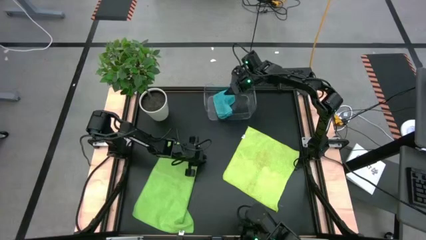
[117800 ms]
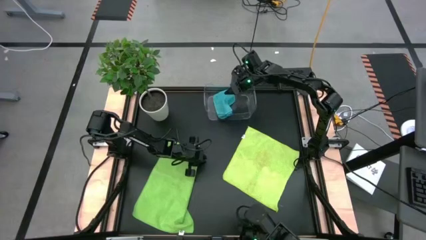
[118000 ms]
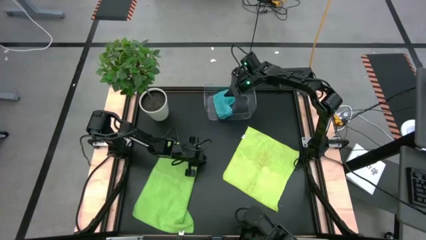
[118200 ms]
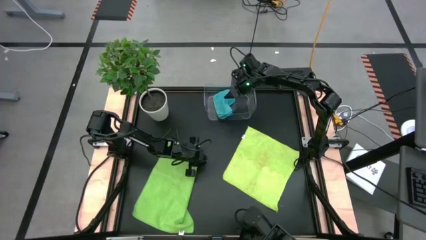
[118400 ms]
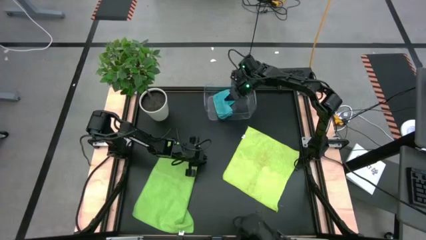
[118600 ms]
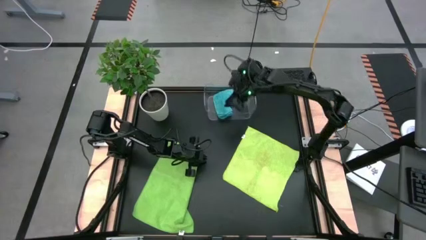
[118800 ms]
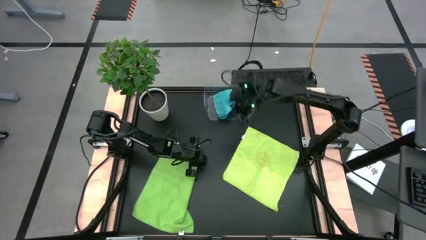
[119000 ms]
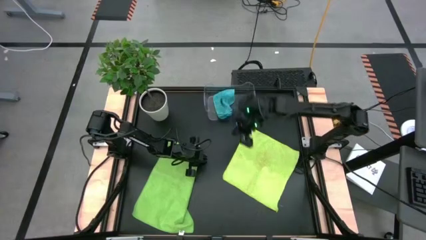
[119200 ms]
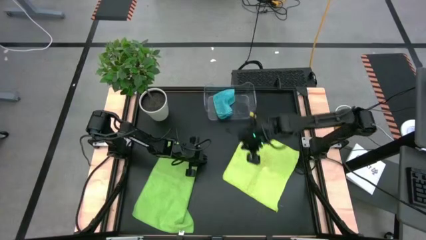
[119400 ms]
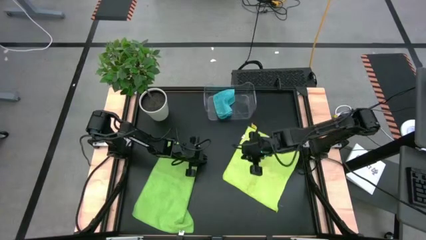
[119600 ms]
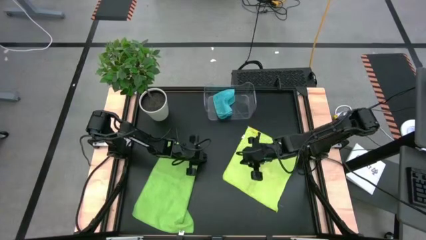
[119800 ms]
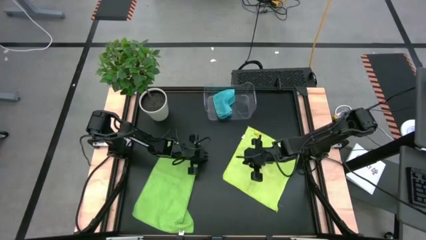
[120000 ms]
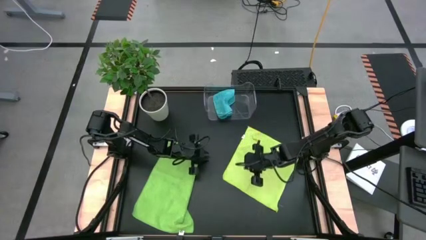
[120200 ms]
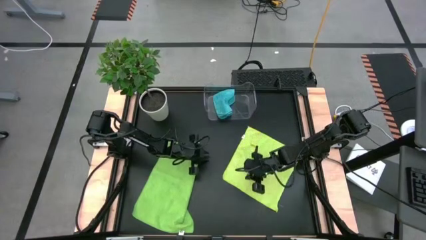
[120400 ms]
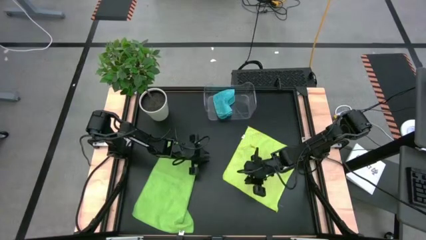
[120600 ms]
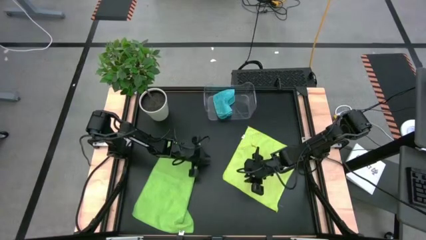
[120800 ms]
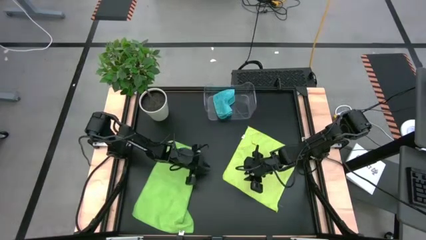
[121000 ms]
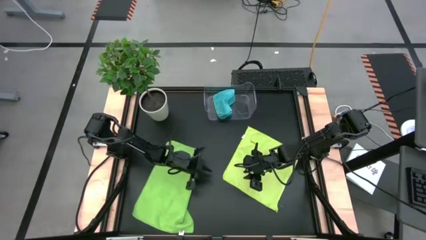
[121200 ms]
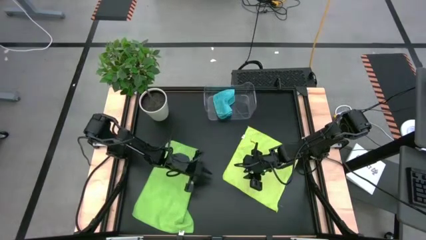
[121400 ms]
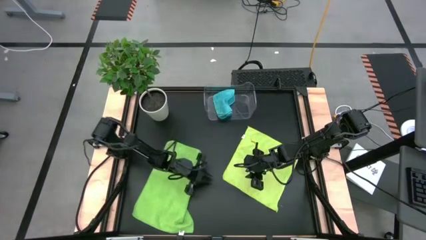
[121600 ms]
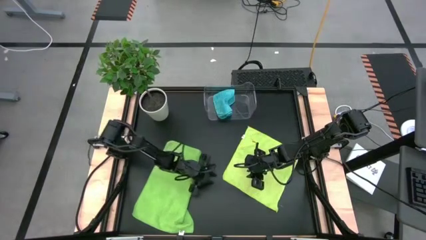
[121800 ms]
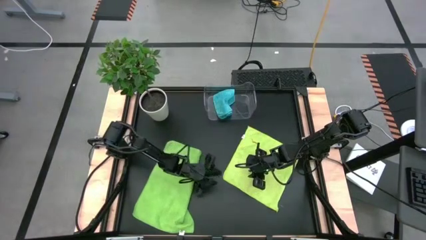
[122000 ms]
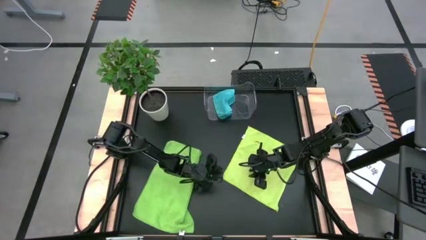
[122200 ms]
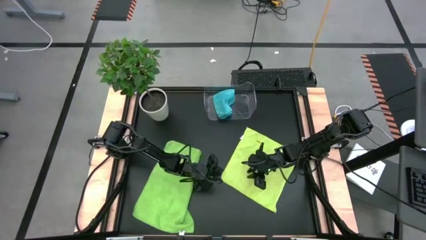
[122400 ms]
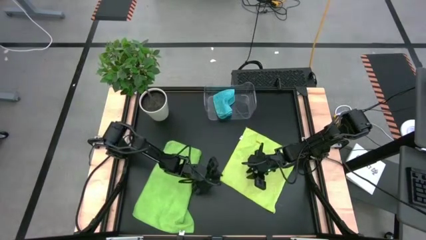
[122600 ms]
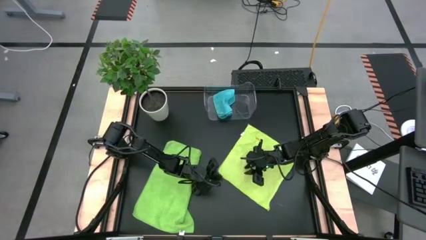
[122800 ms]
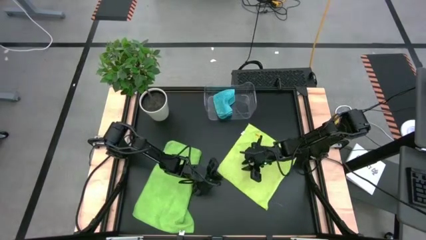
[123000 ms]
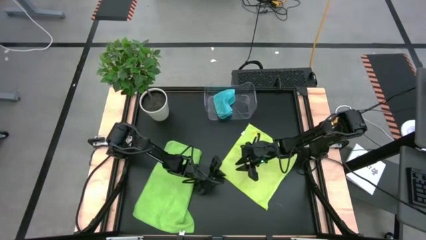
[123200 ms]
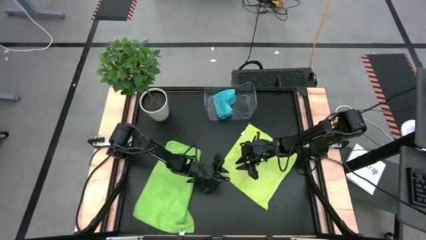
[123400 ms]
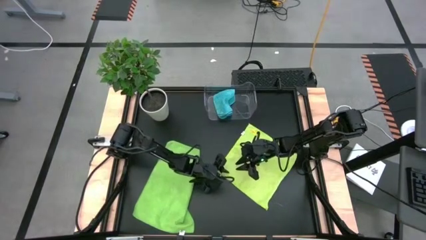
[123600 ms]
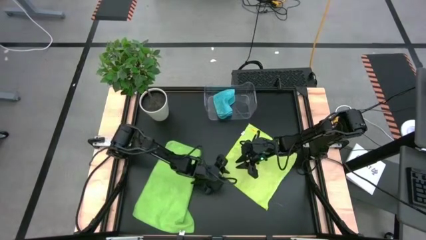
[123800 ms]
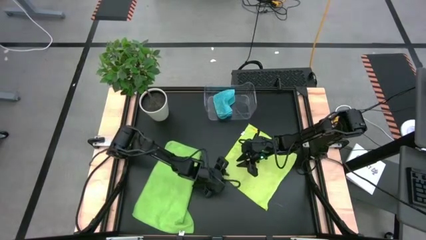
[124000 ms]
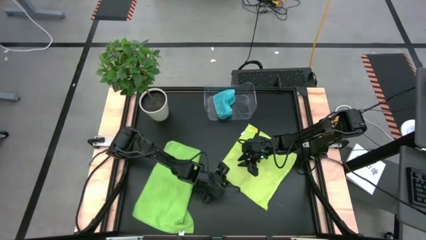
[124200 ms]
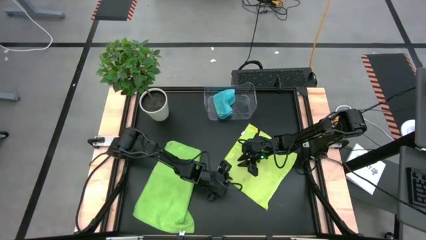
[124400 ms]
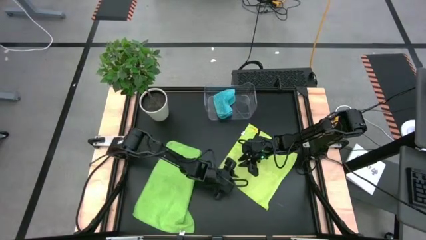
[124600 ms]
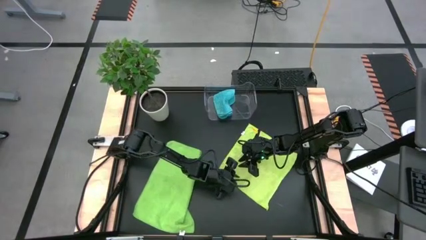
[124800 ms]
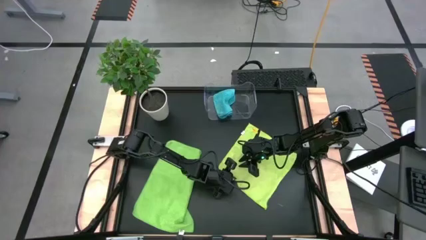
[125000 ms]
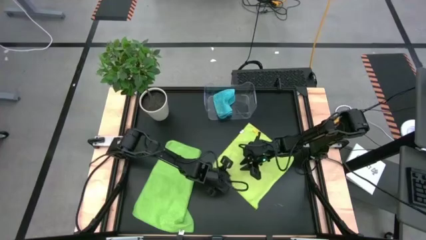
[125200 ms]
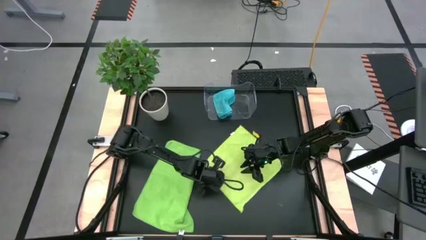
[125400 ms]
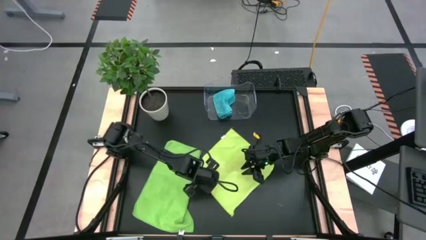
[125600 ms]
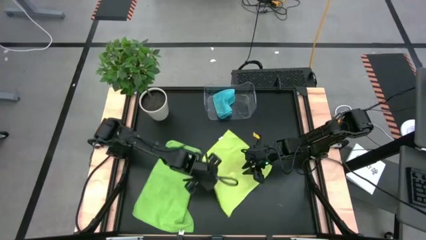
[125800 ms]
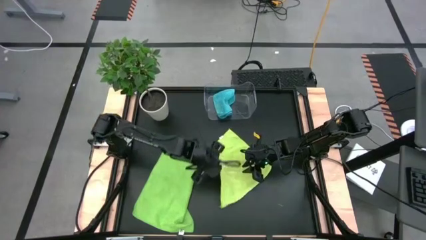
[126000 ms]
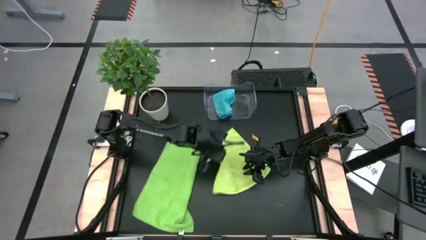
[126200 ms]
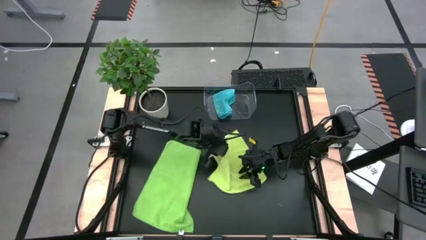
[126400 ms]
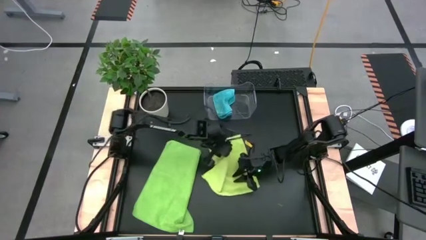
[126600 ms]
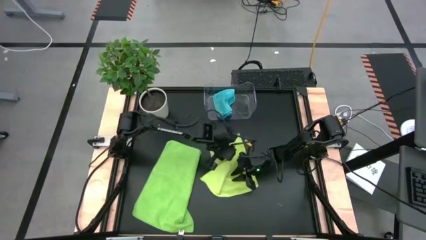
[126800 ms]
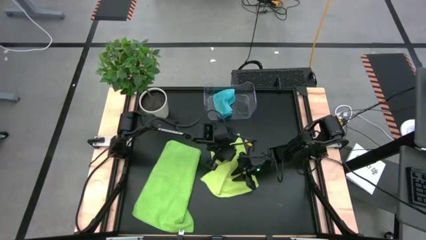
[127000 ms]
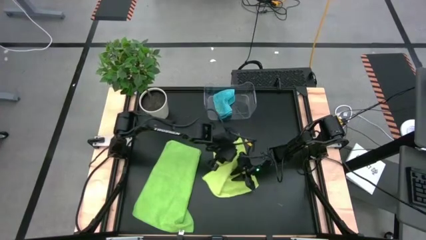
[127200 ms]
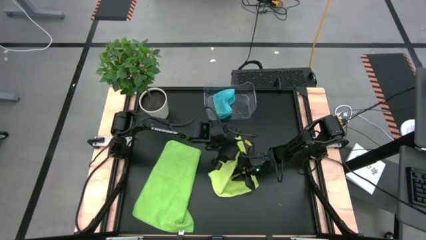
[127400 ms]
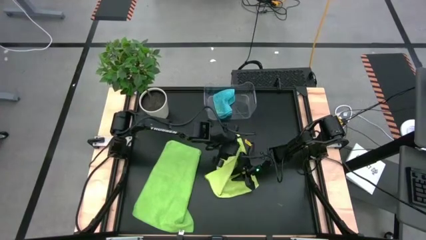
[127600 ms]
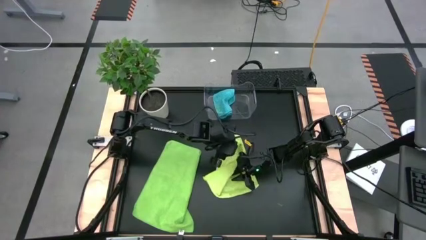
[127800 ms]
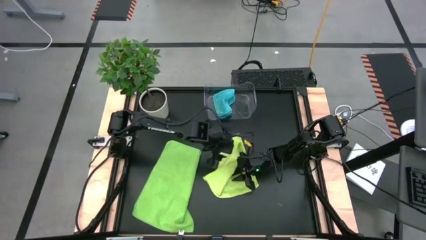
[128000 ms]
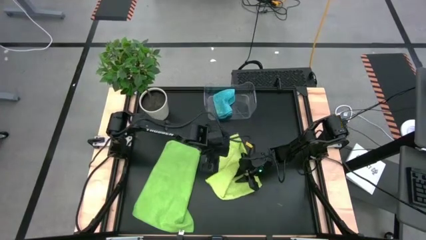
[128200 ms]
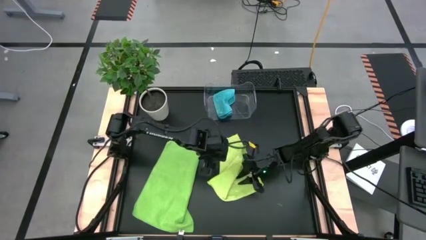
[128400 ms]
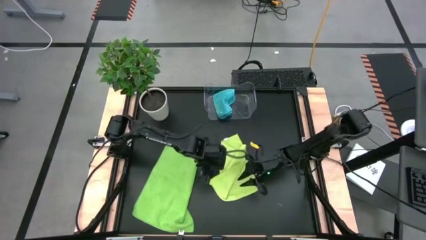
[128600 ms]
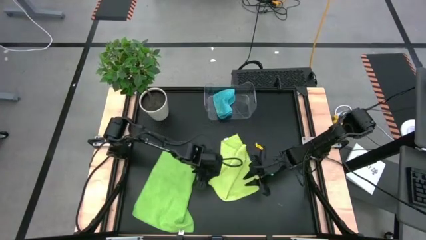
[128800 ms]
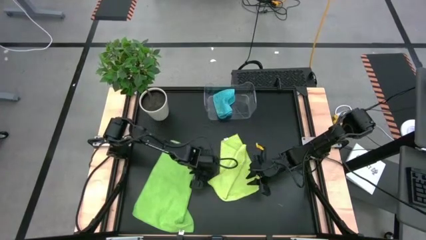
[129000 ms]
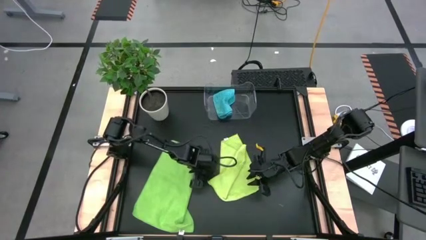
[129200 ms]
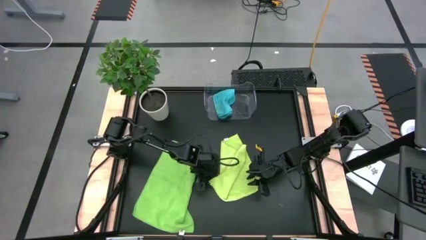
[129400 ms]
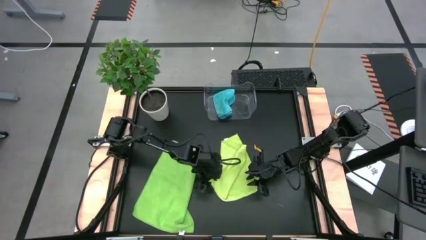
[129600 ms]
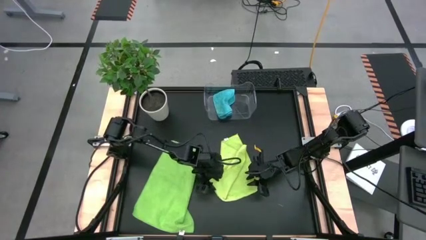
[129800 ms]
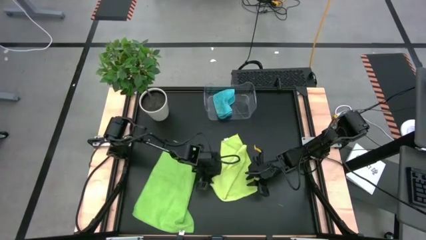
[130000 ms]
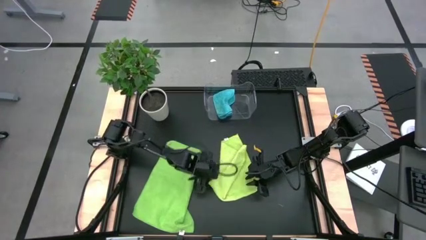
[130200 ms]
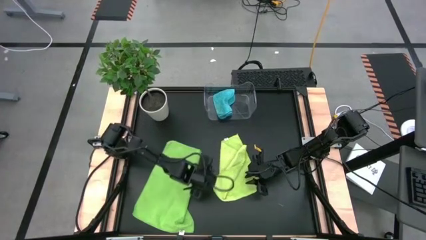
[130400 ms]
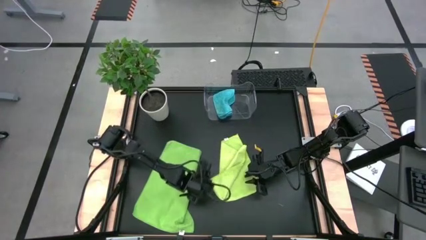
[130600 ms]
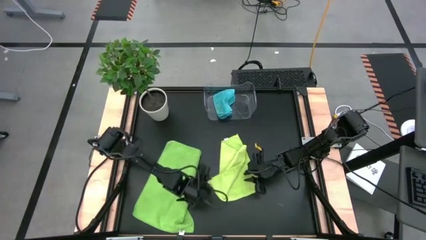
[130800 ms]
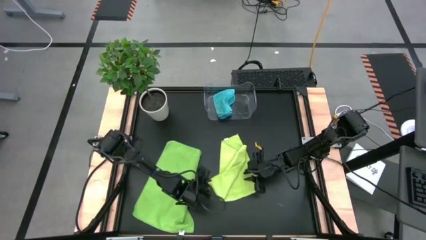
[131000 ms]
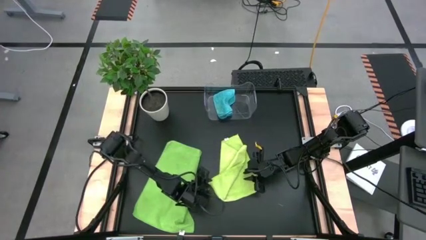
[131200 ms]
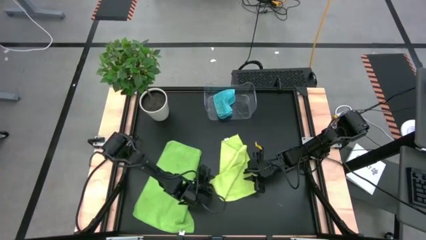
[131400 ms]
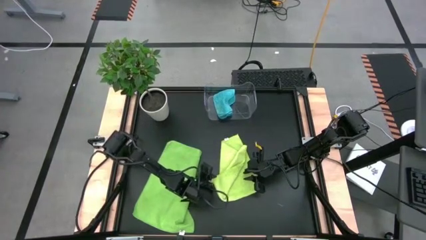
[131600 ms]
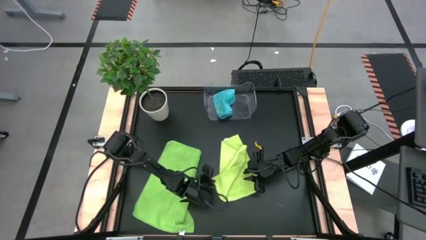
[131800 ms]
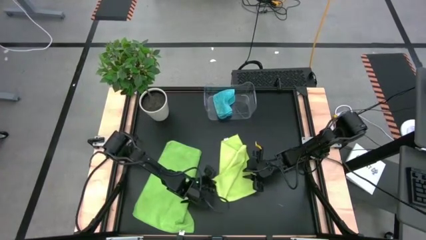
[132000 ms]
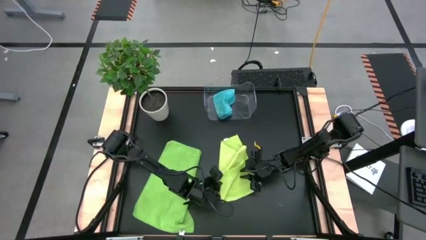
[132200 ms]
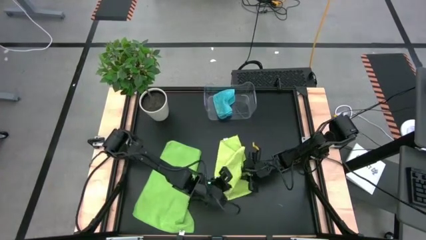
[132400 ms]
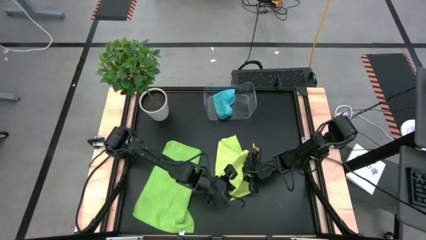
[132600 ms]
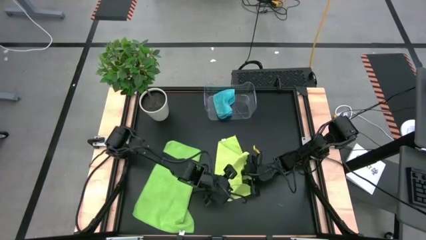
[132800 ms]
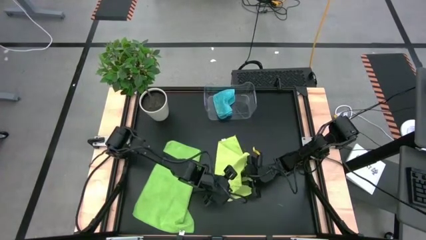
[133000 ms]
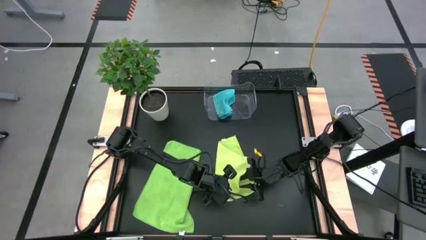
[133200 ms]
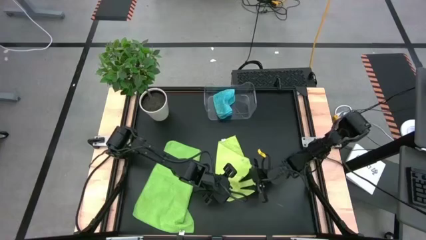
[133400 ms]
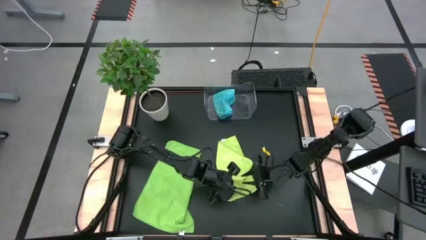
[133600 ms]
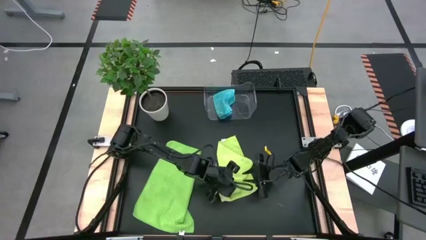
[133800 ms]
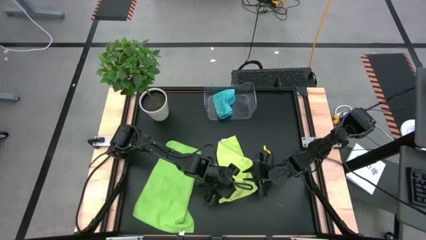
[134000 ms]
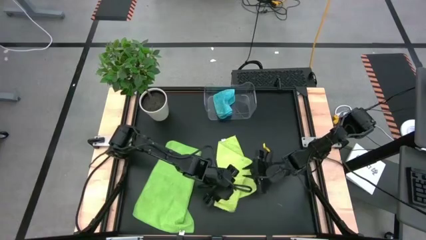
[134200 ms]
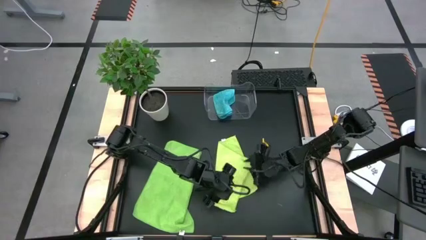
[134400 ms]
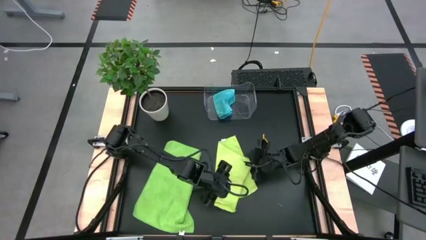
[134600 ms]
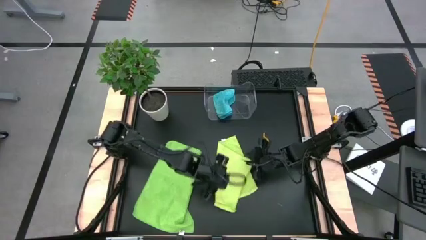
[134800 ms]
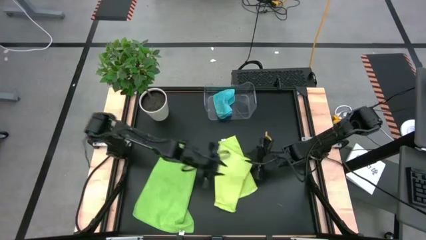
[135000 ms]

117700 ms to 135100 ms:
Task: Fold microfiber towels
Fold the light green microfiber cloth
